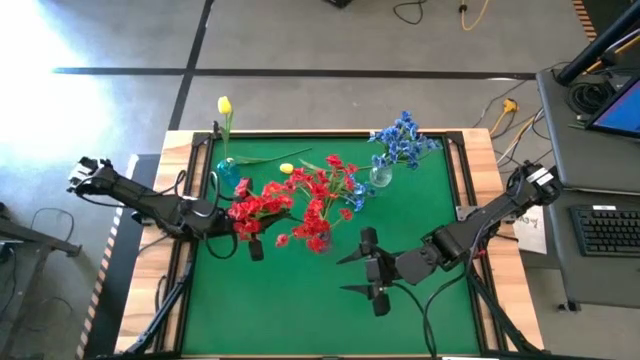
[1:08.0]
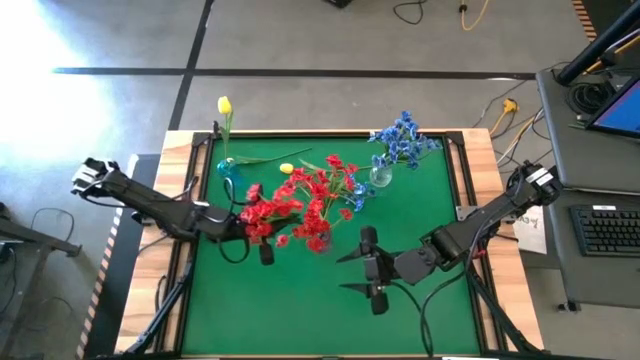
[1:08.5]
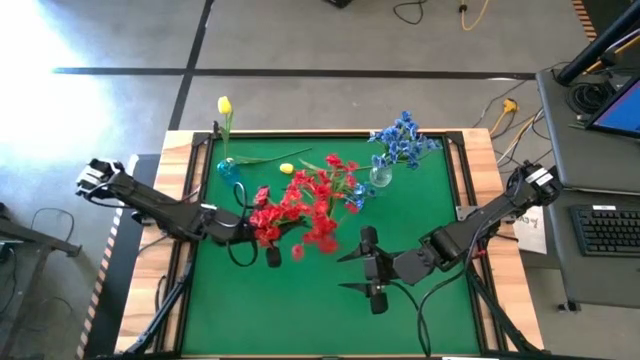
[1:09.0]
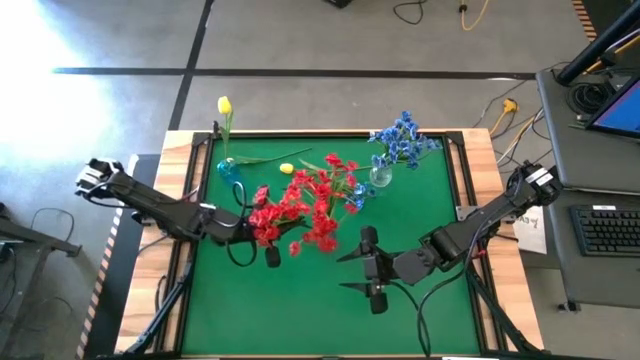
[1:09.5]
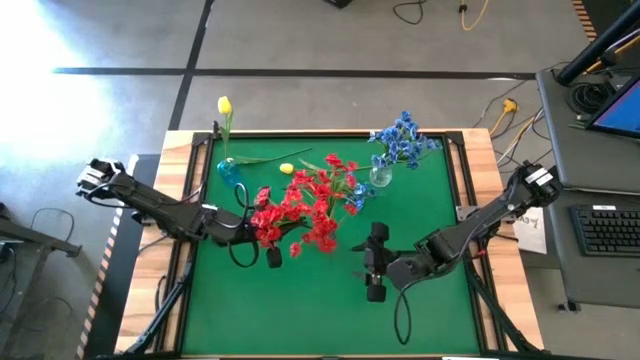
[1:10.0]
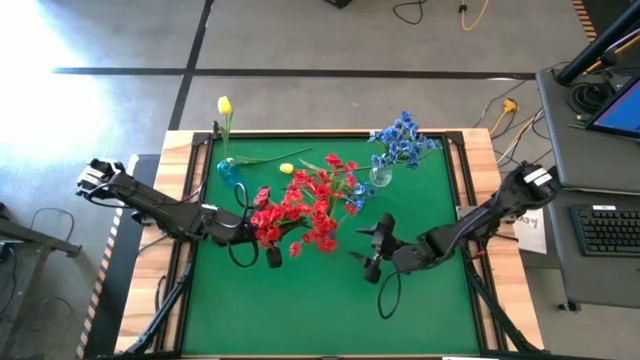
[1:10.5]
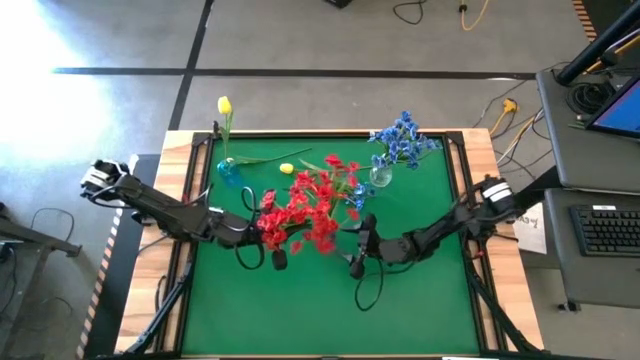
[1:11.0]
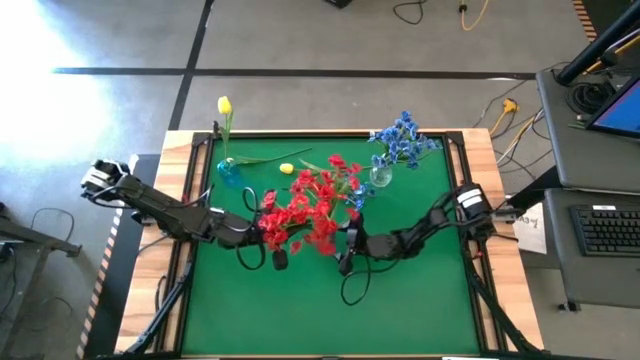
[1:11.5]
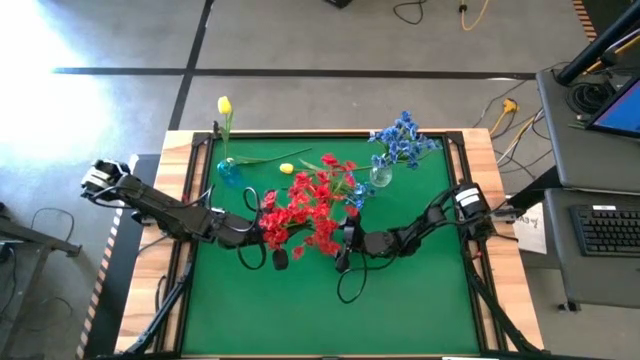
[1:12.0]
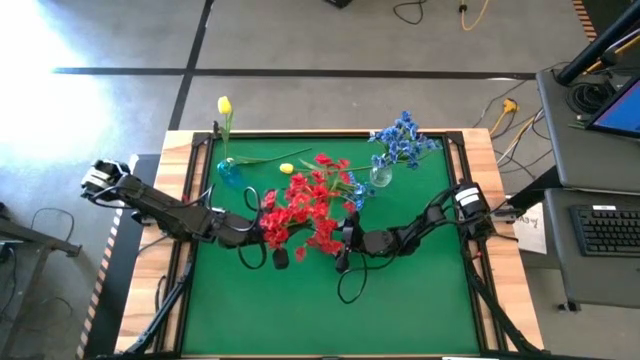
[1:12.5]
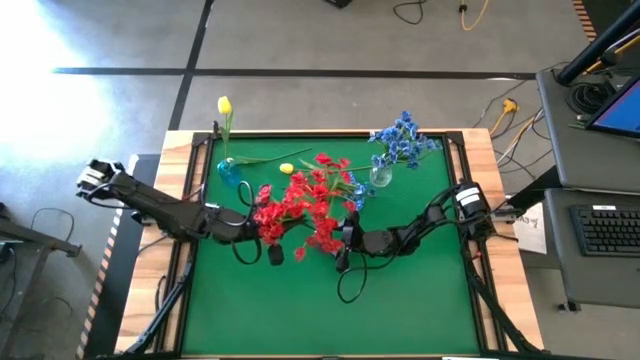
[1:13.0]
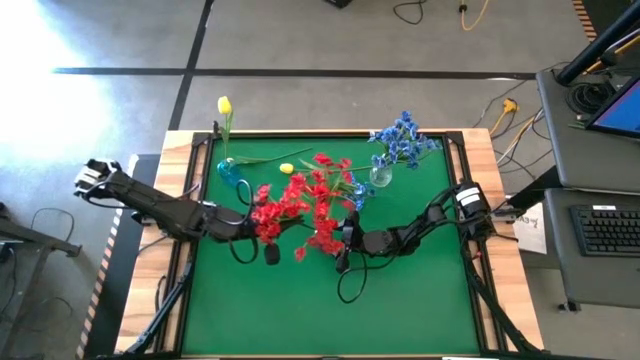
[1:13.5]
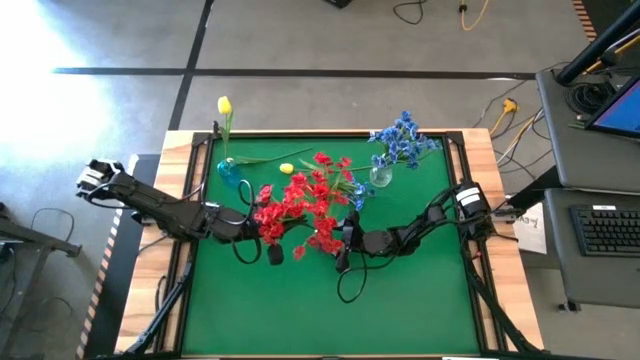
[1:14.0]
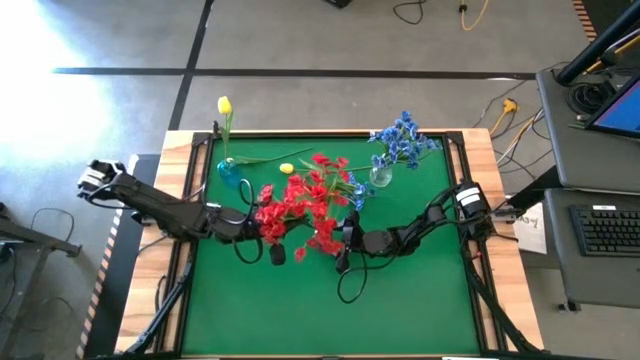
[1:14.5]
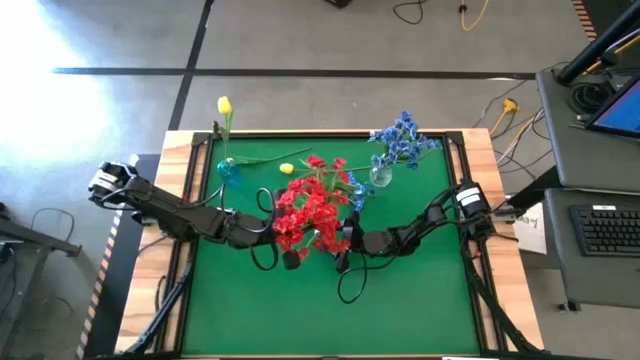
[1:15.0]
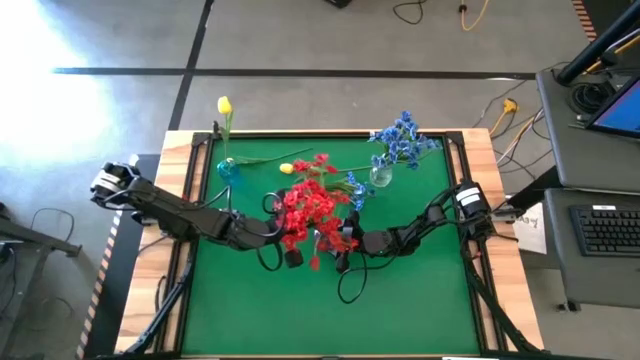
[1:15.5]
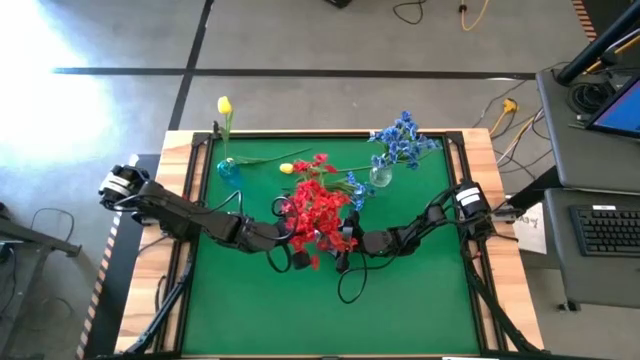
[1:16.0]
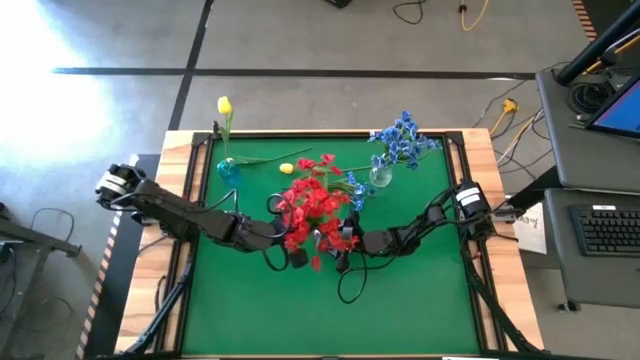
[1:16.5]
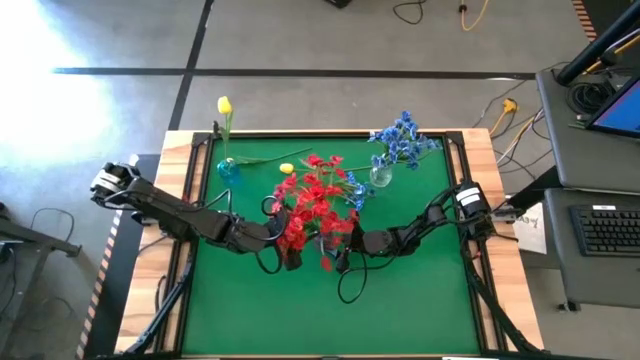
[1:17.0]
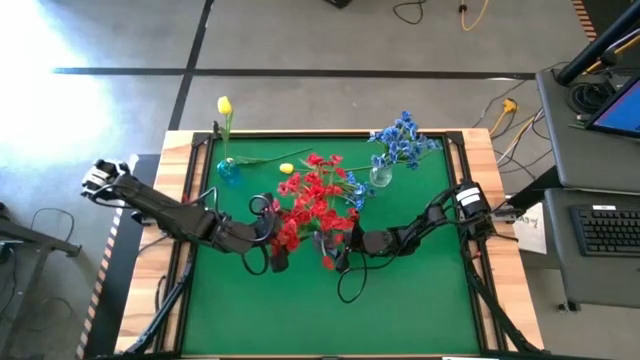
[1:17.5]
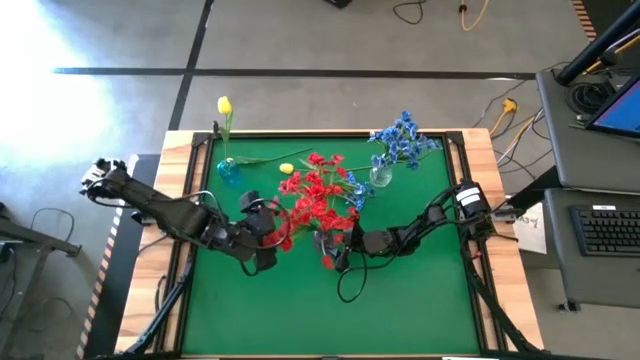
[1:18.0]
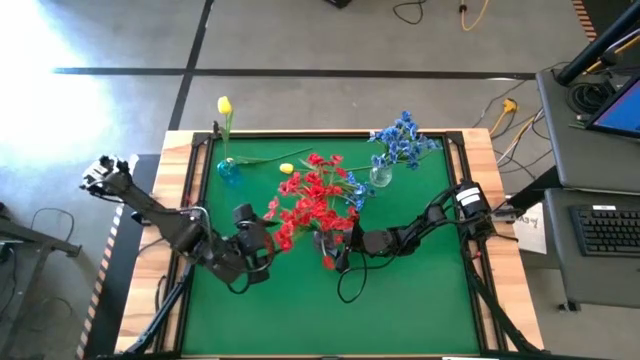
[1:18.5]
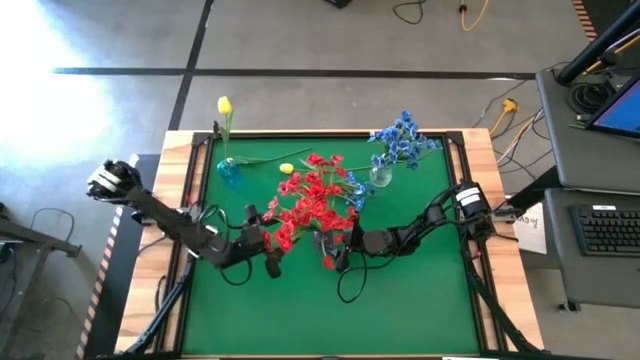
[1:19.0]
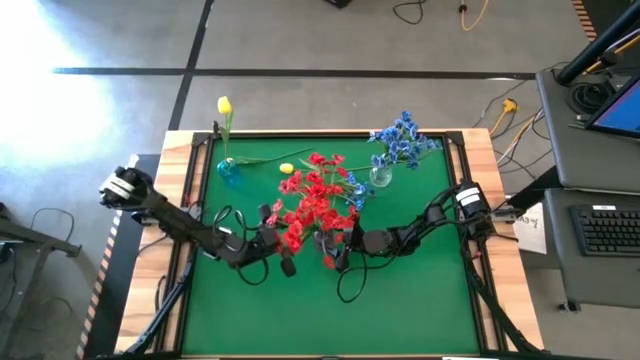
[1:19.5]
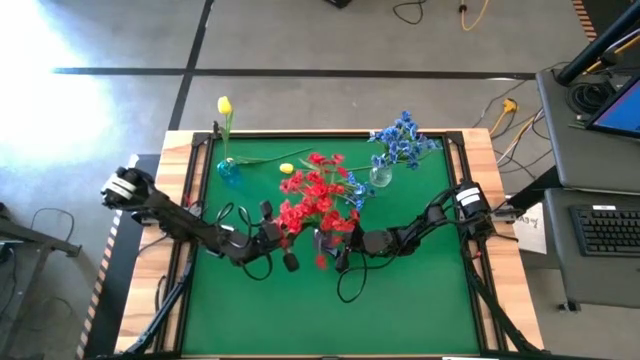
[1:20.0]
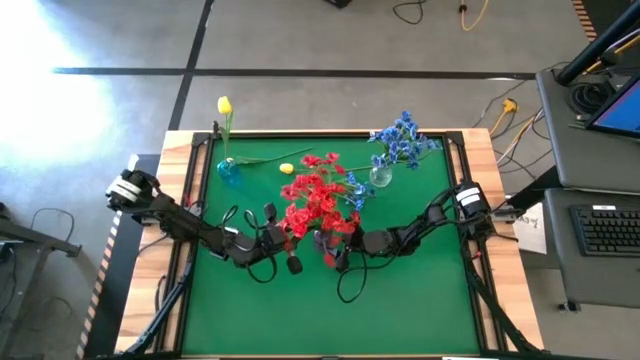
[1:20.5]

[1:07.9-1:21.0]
Task: Sort flowers into vase by color
Put the red flowers into the purple vase

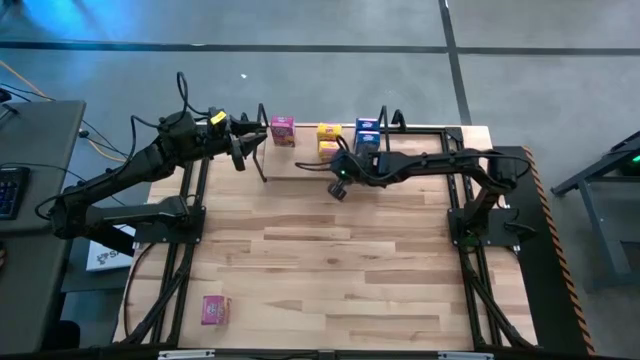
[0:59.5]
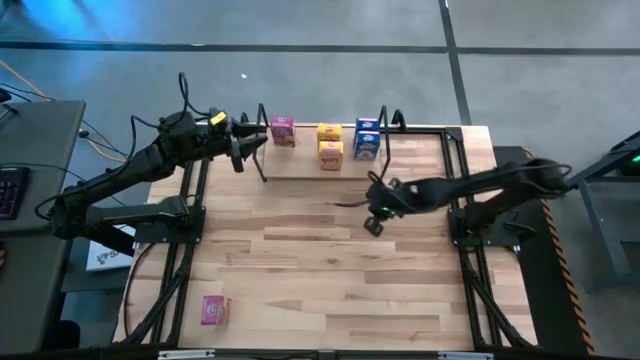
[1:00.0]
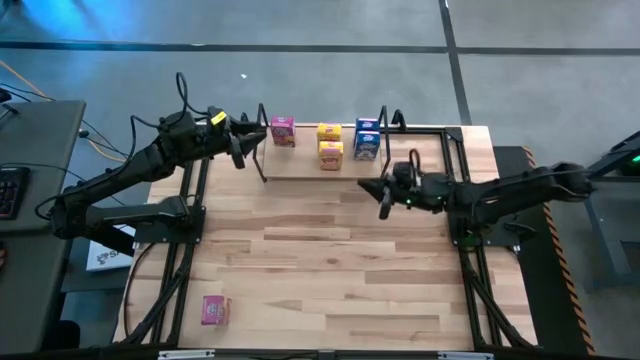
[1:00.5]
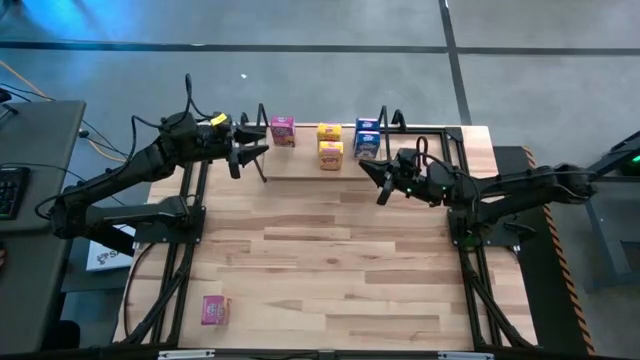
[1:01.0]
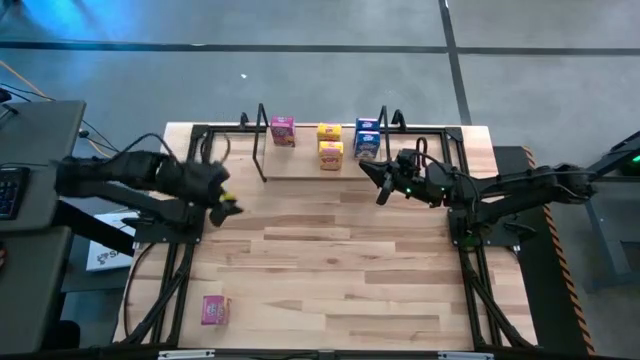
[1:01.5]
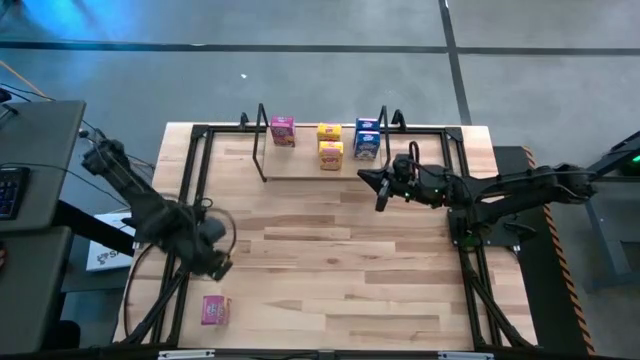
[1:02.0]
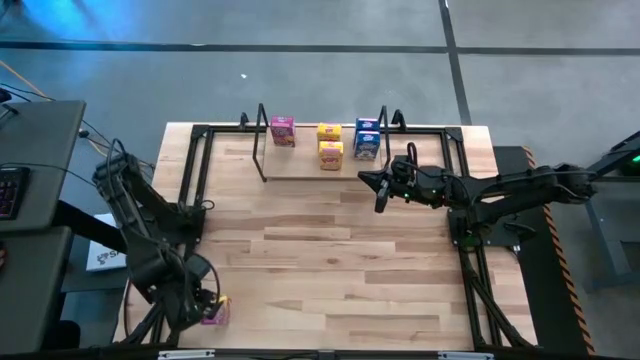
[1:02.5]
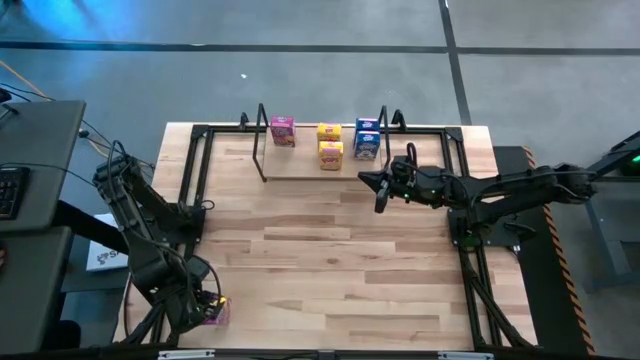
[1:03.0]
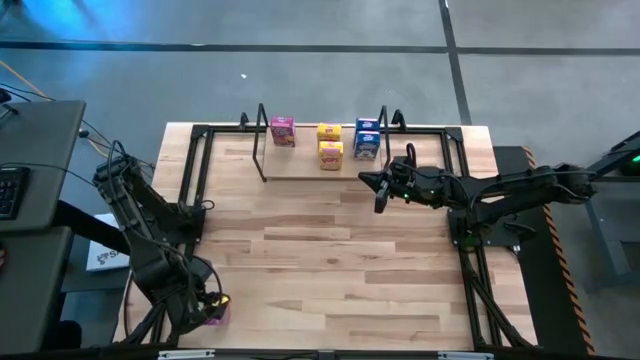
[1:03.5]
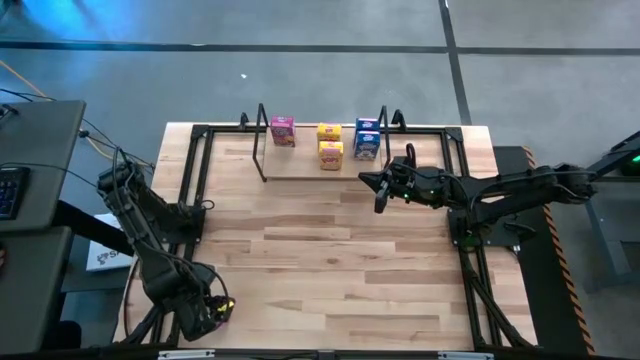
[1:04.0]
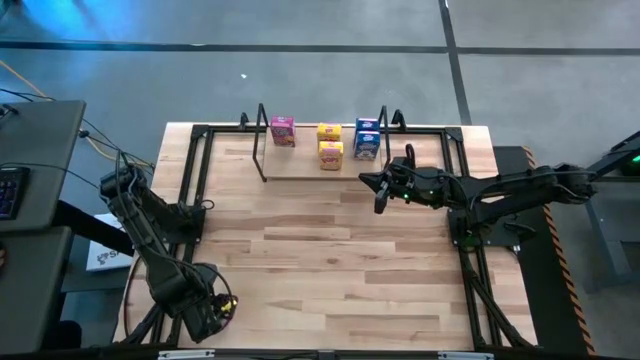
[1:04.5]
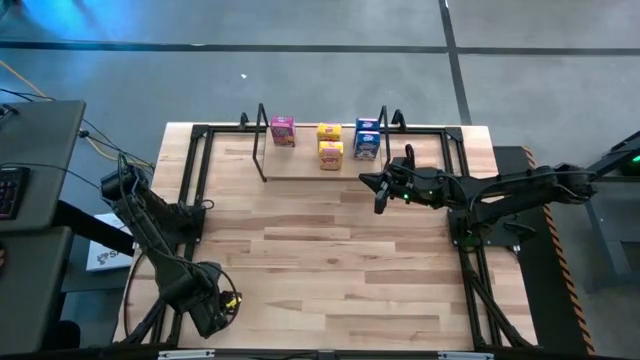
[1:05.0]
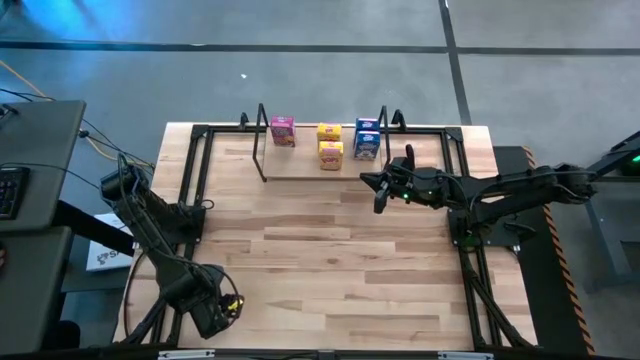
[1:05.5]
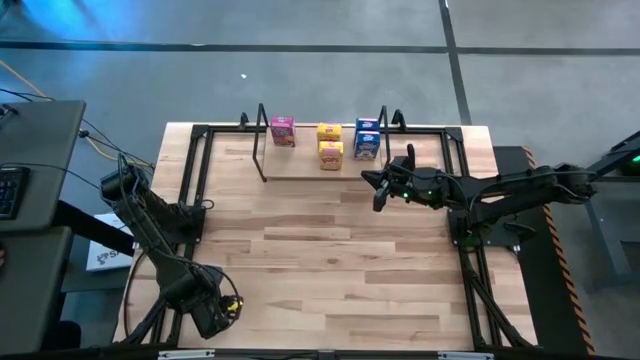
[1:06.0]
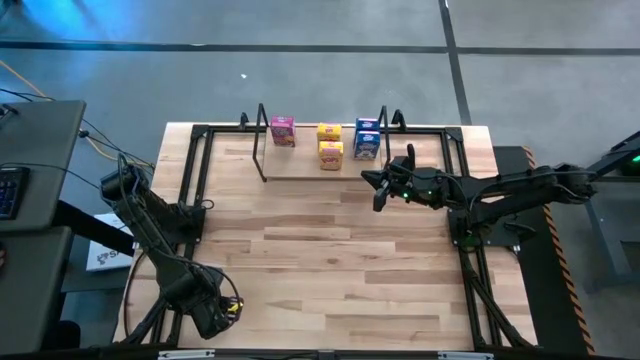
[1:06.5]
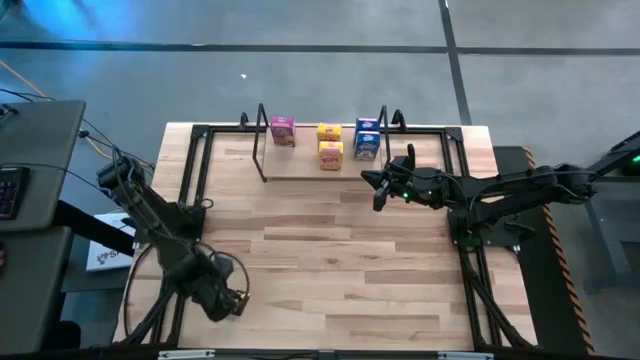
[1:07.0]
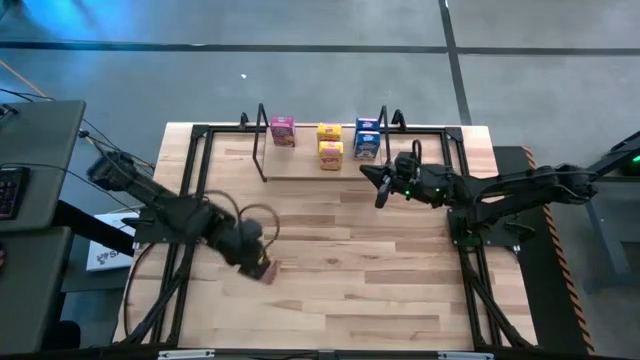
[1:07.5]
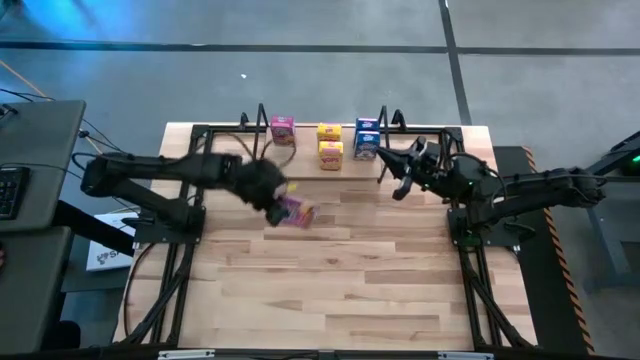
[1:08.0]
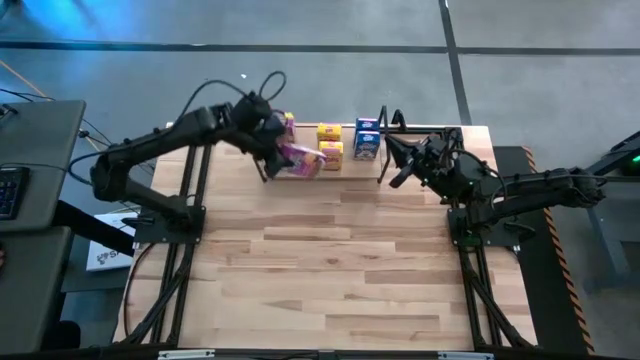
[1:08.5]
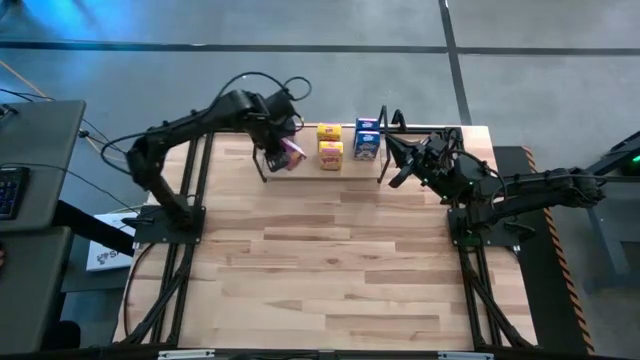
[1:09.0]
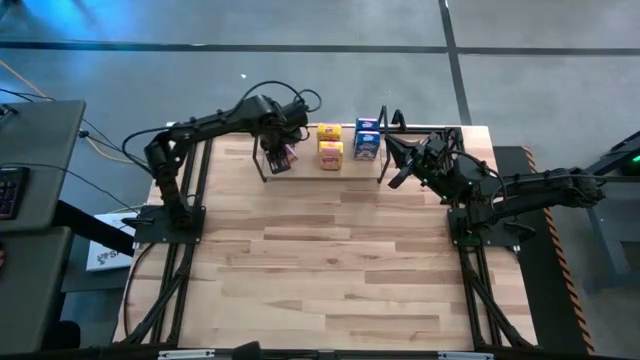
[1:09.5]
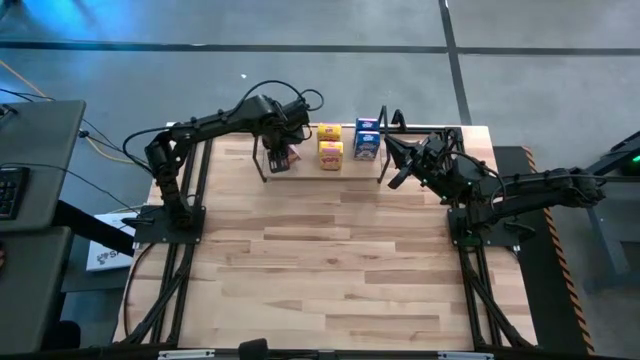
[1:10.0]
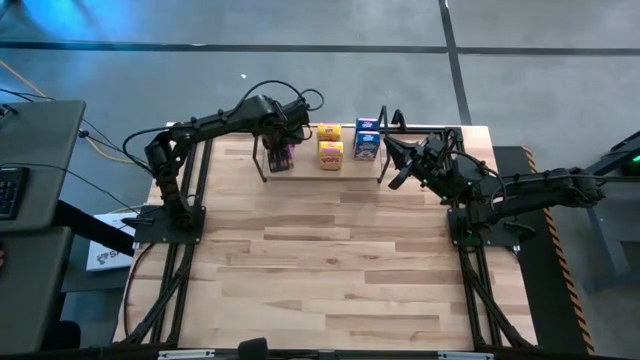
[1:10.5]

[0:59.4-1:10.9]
Task: Stack cereal on shelf
Put the violet cereal box aligned with the other violet cereal box on the shelf
